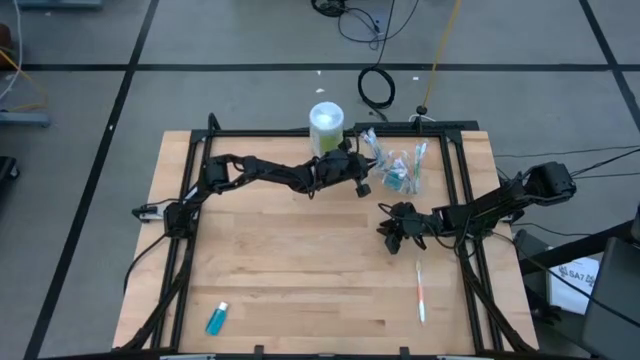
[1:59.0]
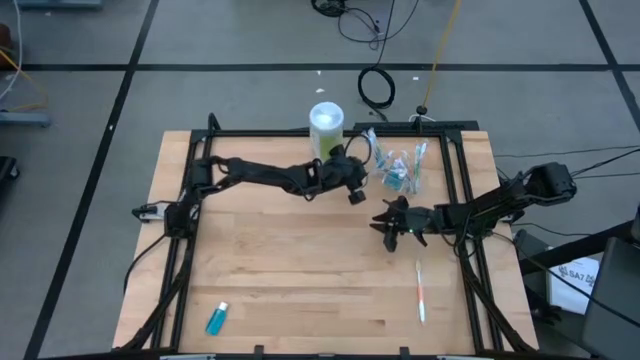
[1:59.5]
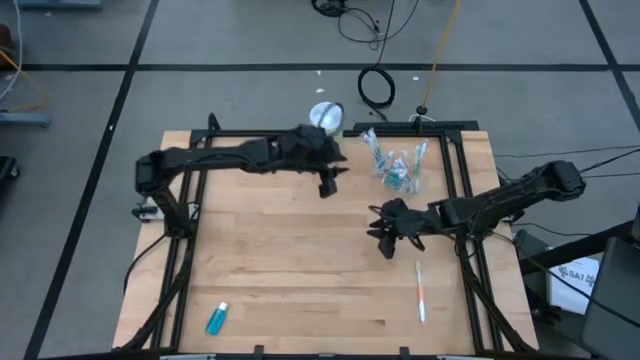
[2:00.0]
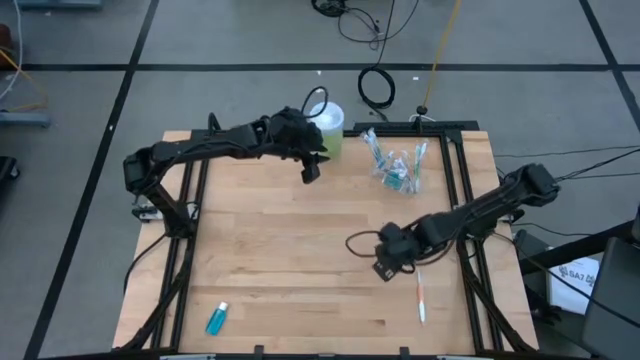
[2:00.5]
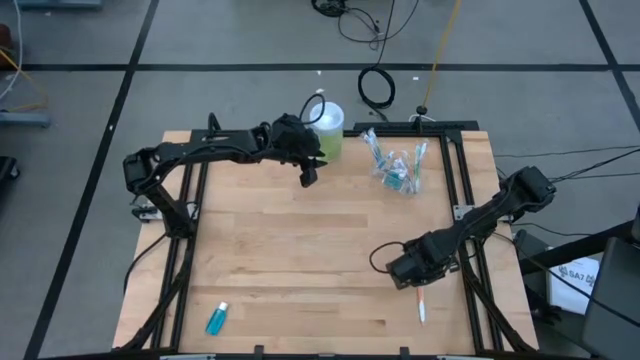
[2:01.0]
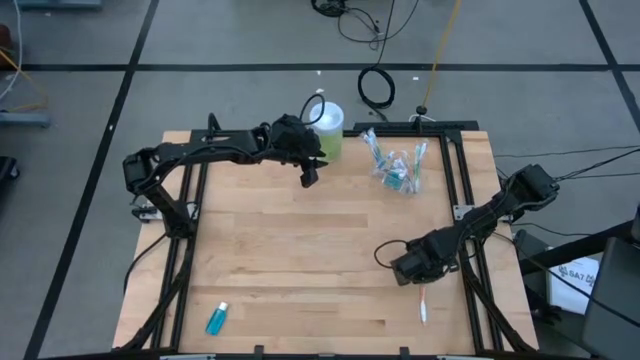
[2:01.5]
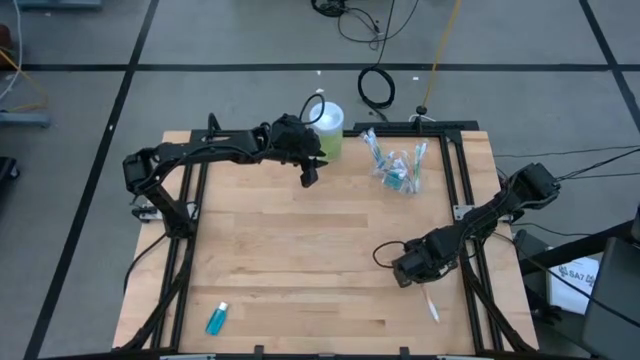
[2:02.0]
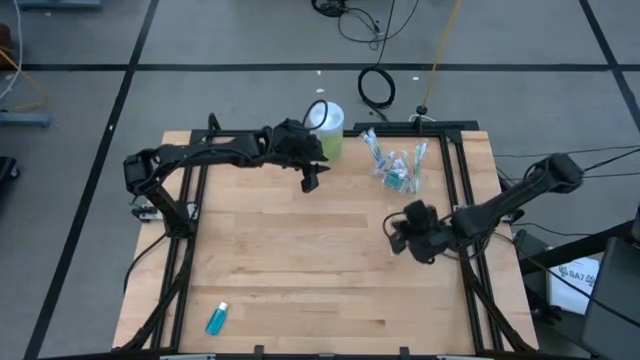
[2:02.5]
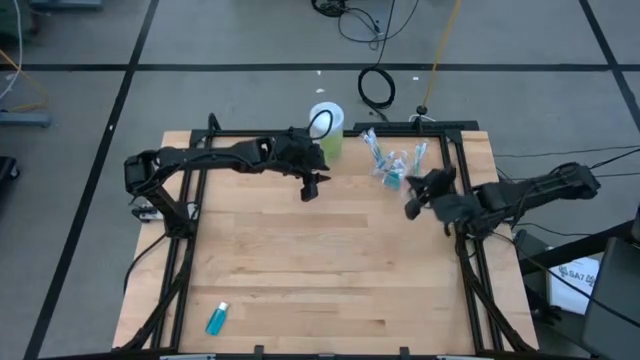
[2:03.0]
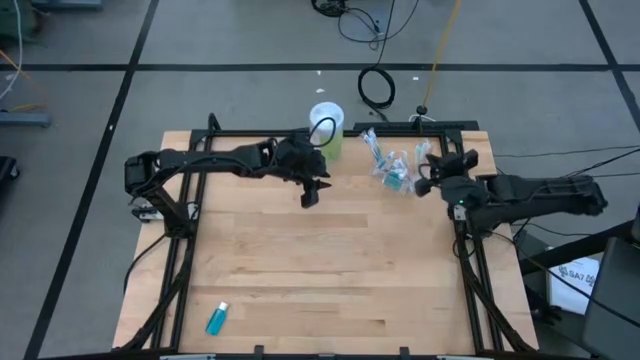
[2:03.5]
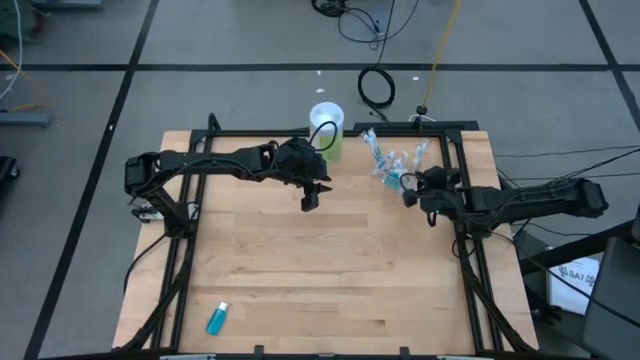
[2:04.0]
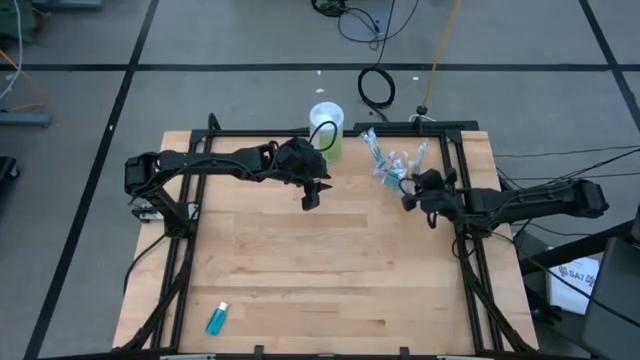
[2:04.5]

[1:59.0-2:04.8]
Task: Pick & Place toothbrushing station
Put the orange toothbrush into the transparent organizer

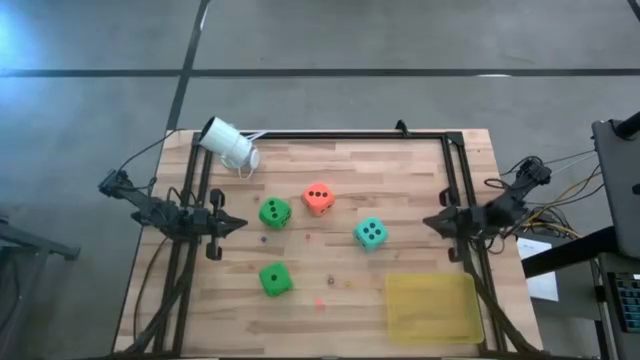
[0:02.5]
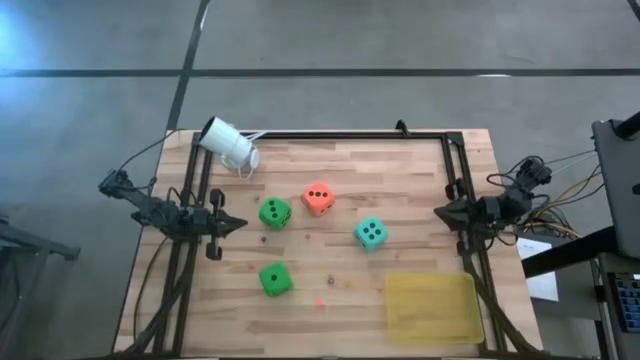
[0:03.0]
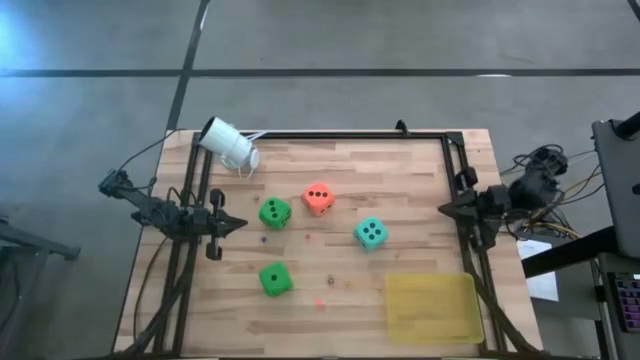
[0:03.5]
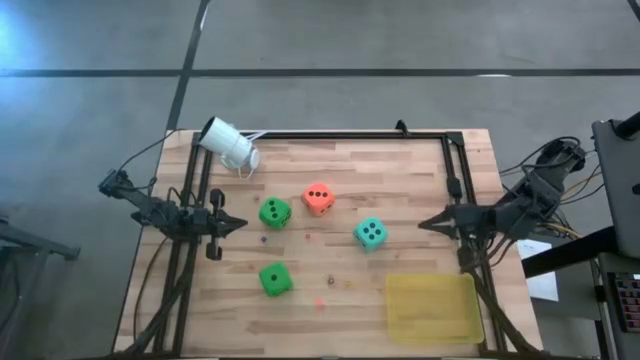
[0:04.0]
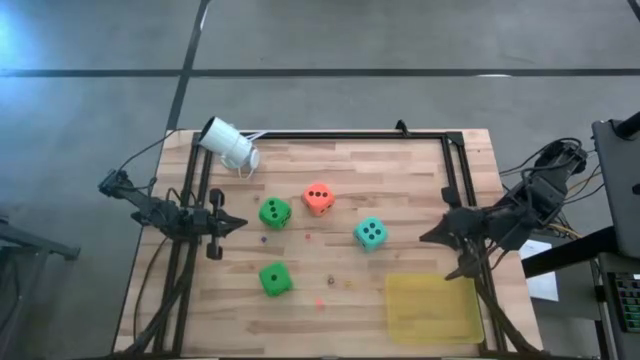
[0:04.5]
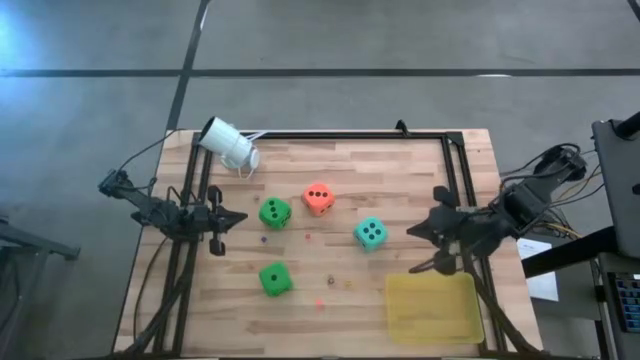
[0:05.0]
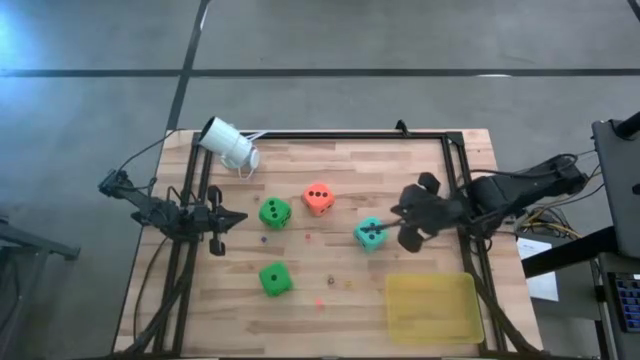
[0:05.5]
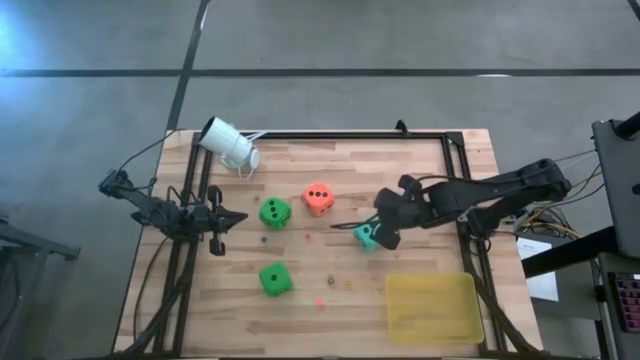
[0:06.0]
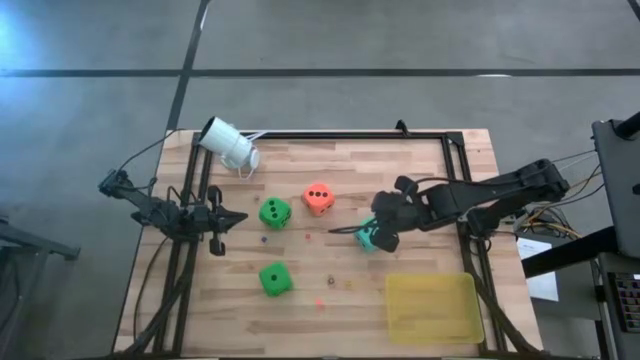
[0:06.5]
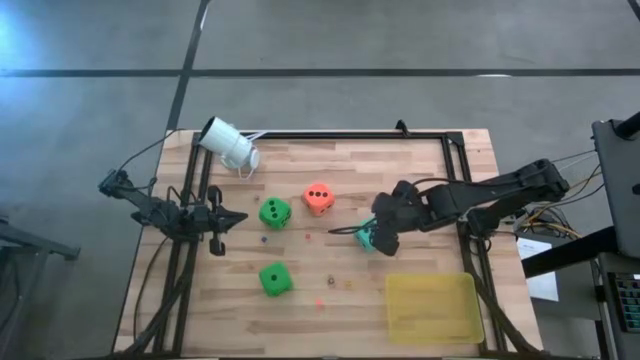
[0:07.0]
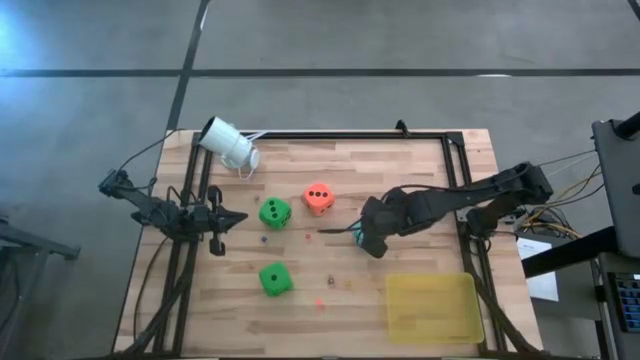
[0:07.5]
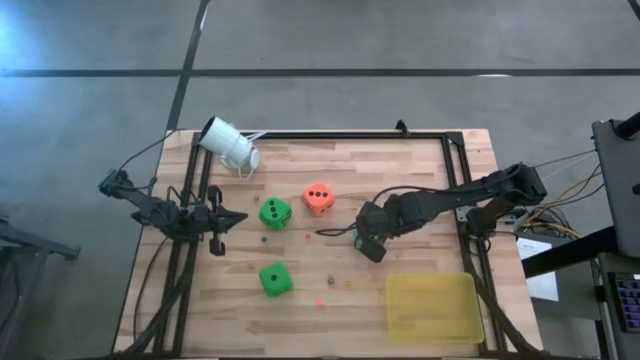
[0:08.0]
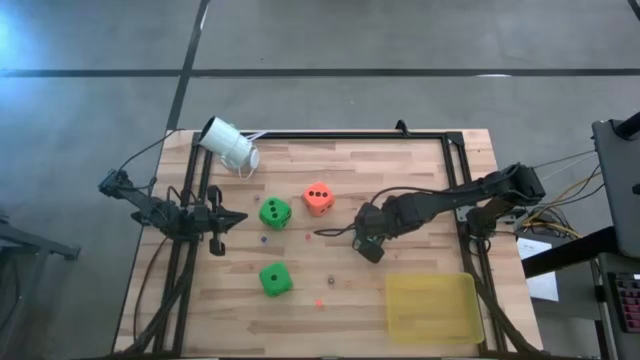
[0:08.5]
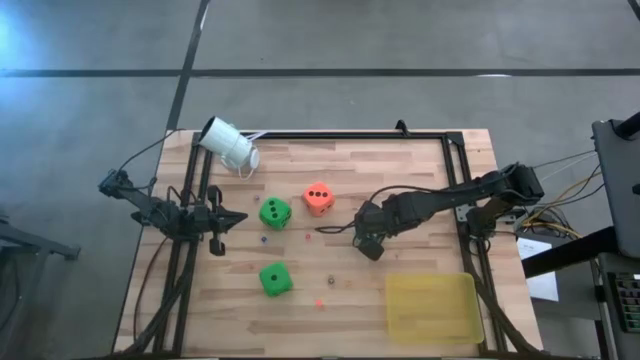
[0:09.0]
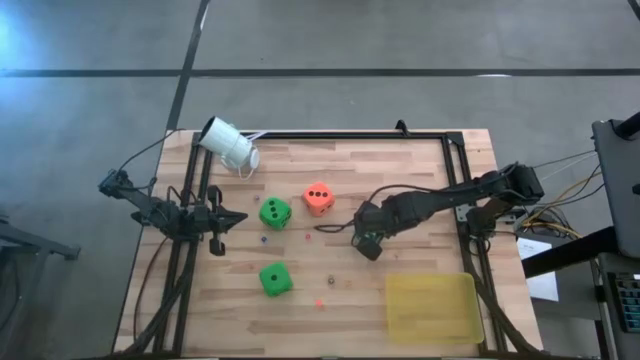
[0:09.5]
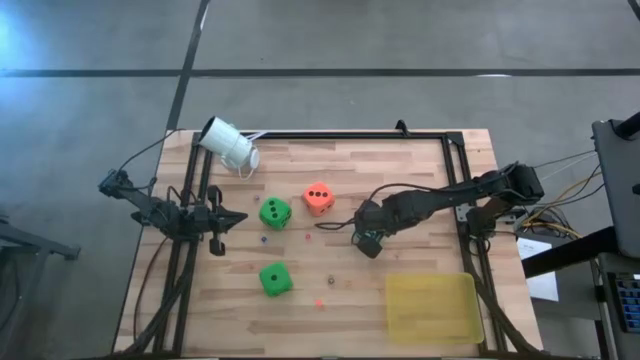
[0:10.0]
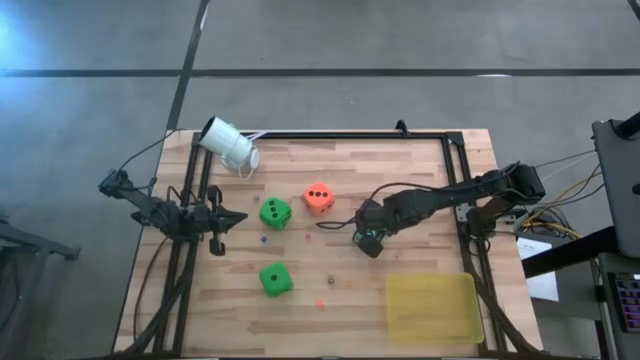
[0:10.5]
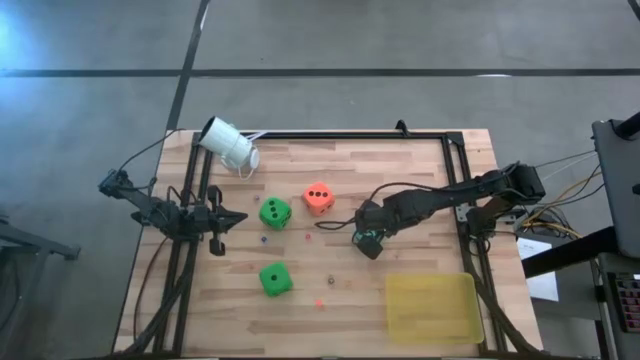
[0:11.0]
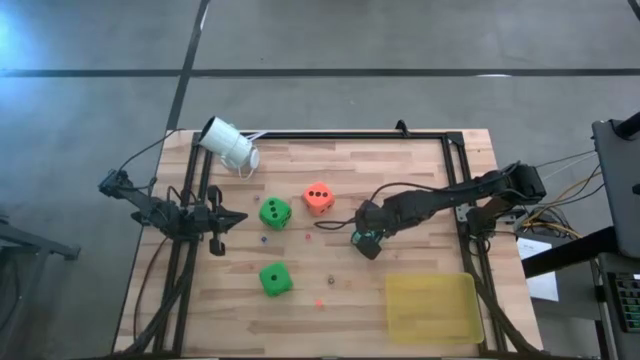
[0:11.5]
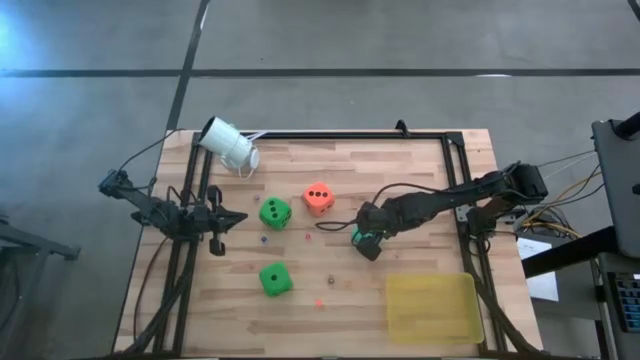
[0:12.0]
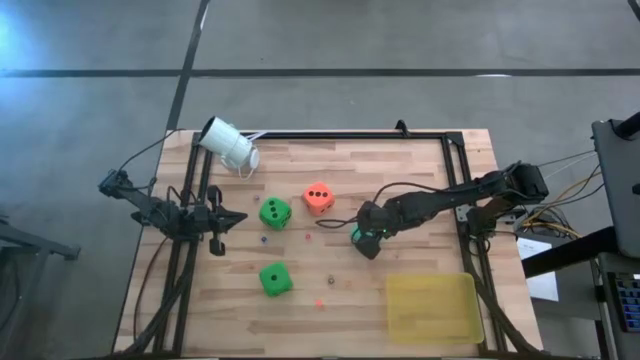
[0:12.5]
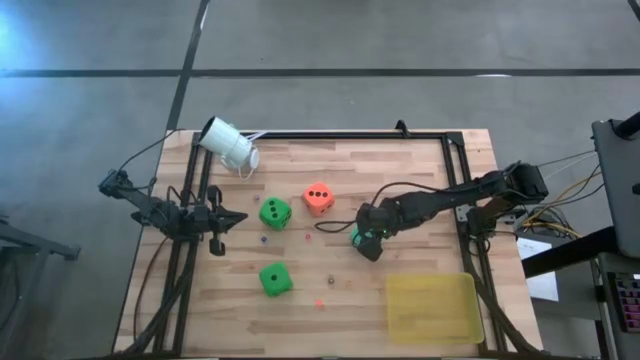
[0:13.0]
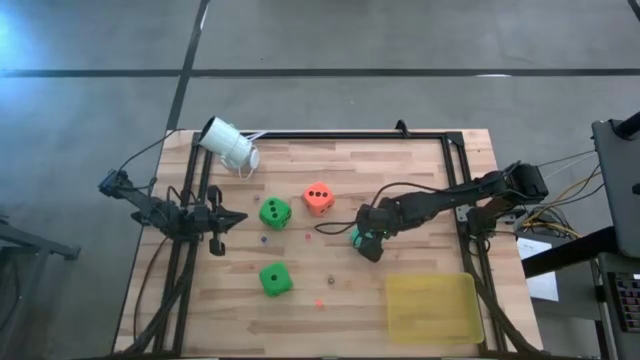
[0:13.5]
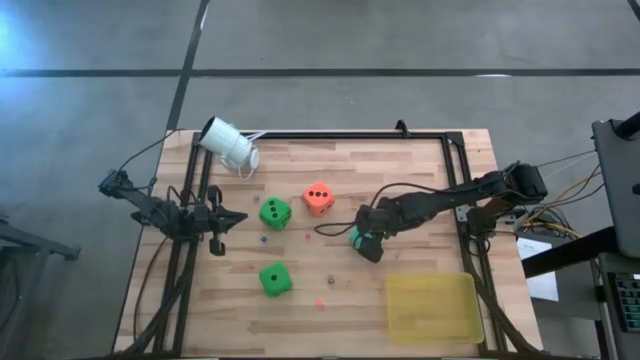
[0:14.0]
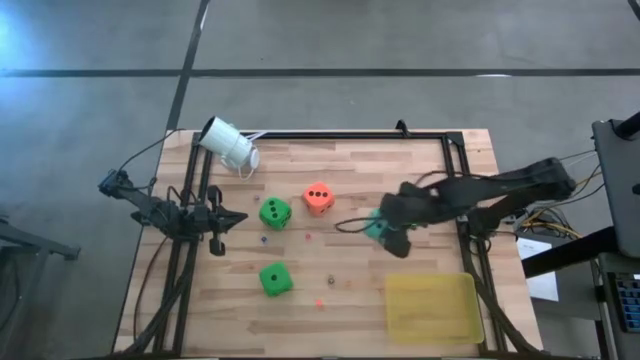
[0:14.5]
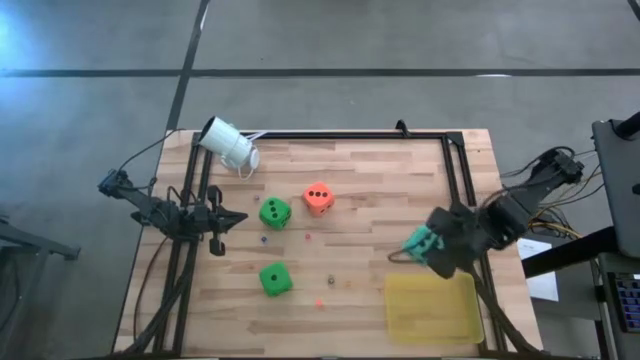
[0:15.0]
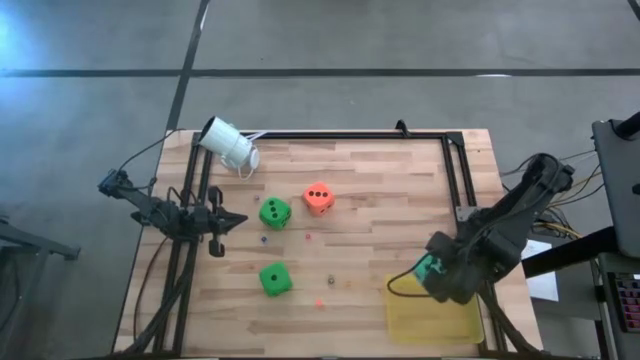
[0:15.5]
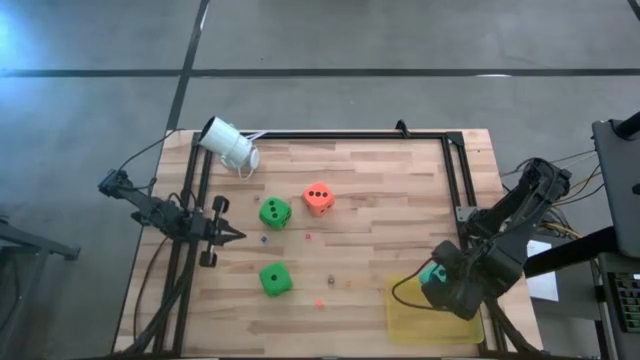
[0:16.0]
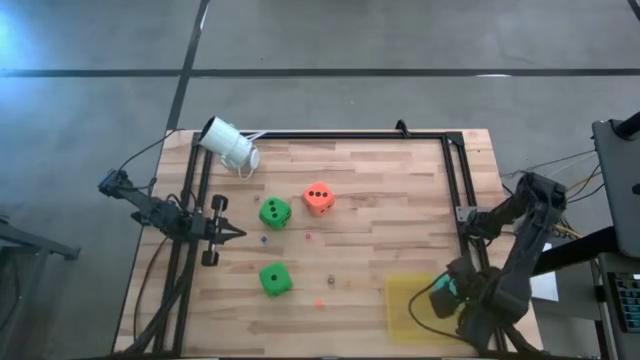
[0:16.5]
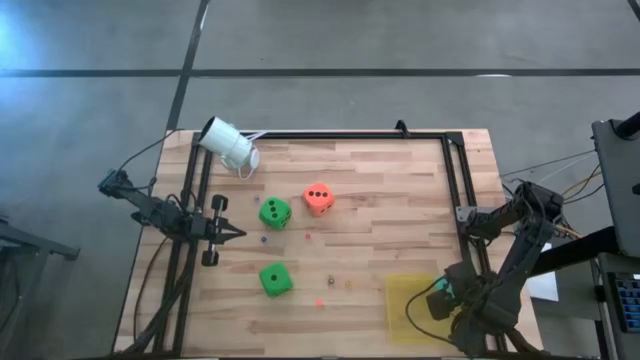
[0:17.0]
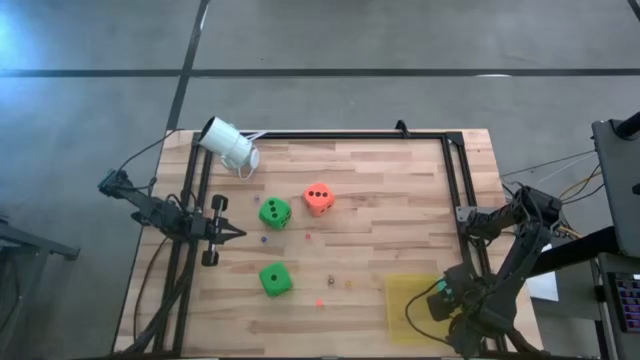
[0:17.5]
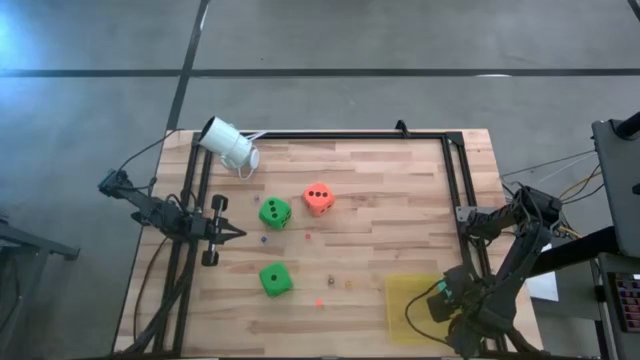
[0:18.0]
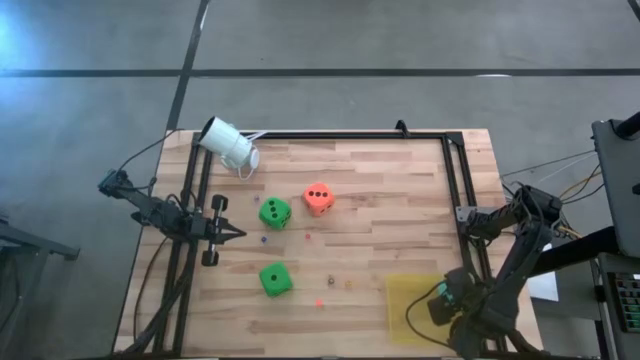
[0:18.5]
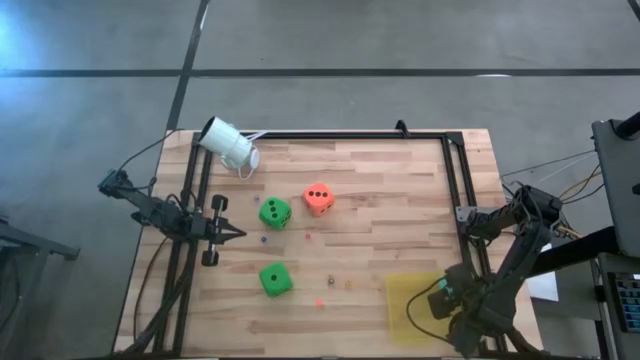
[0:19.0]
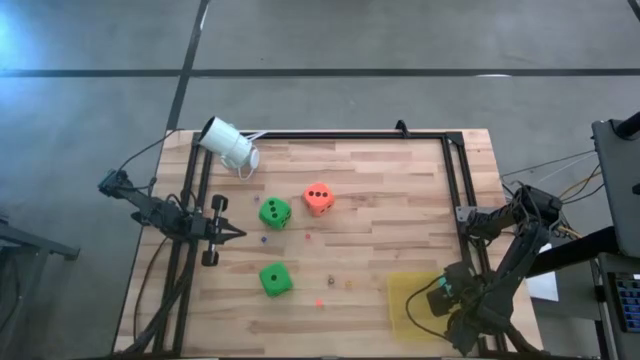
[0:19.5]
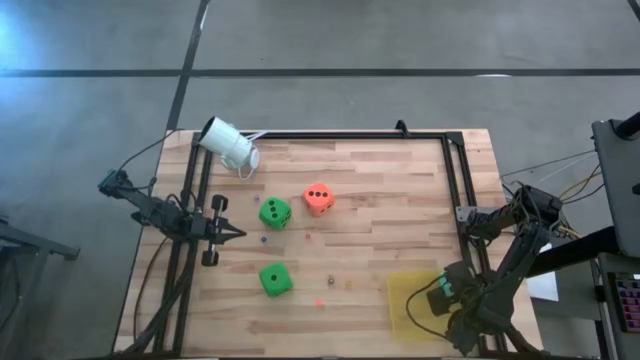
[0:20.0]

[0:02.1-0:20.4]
Task: Pick & Place Dice
Put the large blue die into the yellow bin
